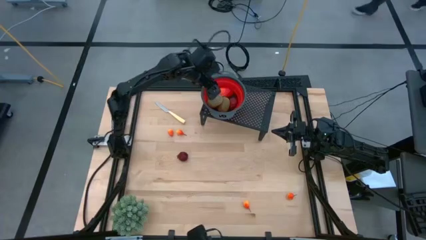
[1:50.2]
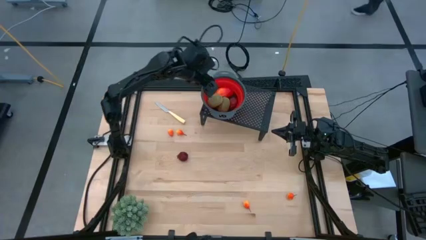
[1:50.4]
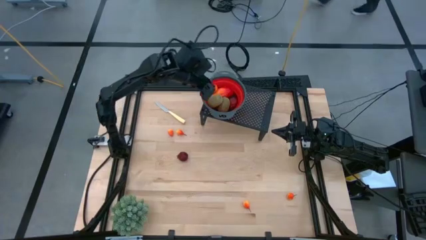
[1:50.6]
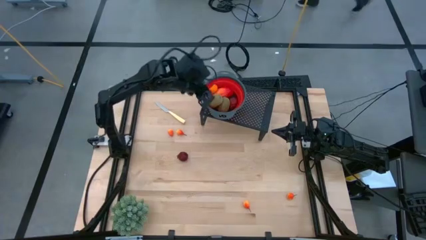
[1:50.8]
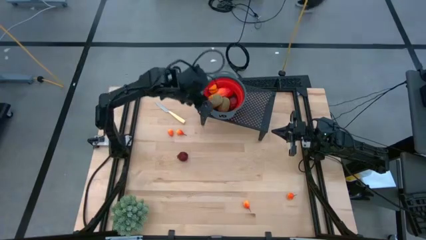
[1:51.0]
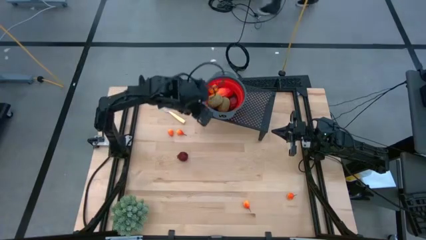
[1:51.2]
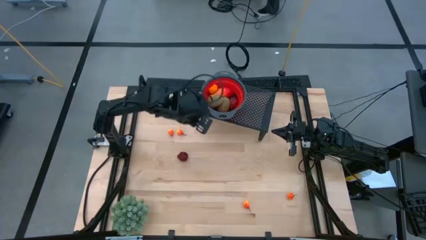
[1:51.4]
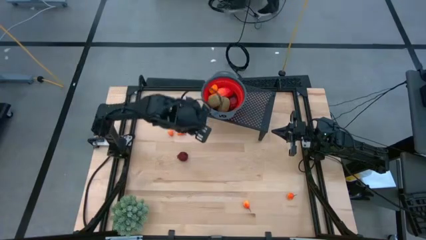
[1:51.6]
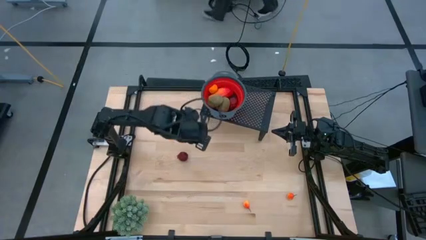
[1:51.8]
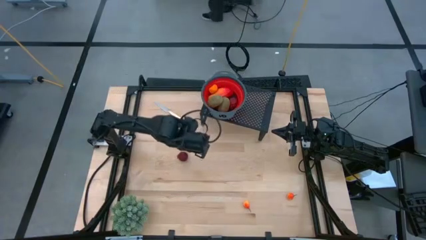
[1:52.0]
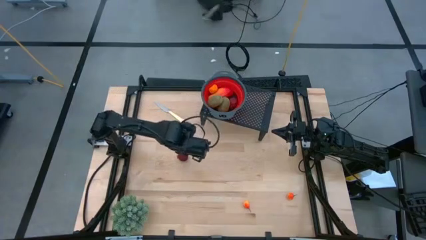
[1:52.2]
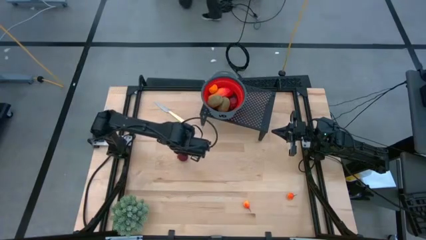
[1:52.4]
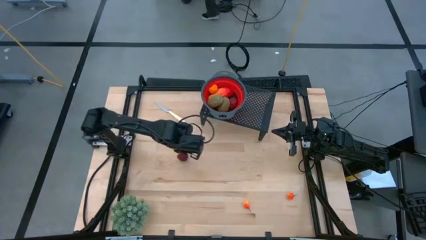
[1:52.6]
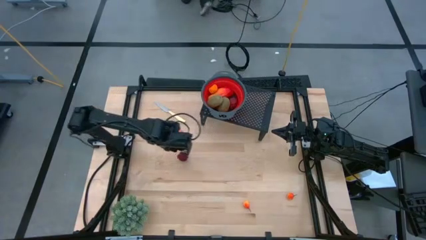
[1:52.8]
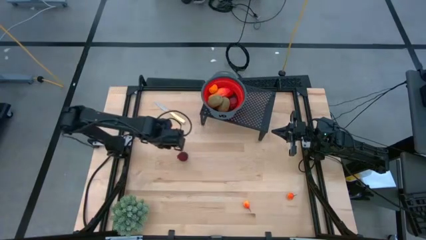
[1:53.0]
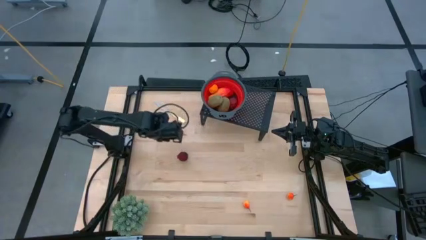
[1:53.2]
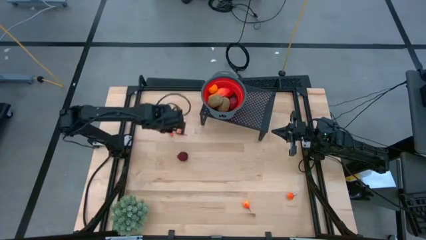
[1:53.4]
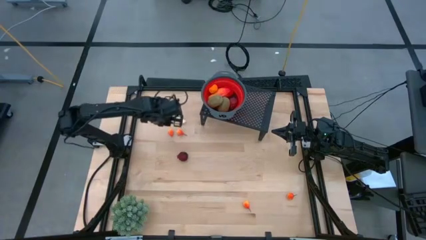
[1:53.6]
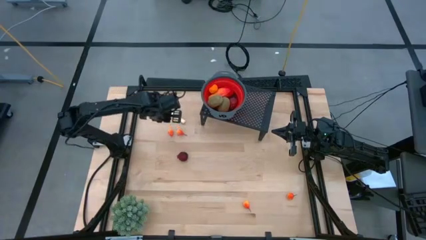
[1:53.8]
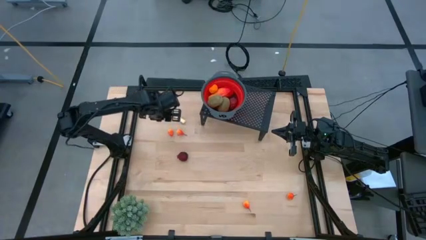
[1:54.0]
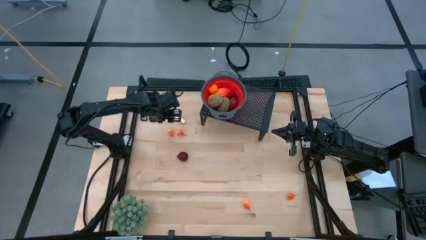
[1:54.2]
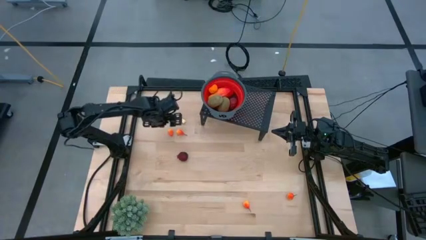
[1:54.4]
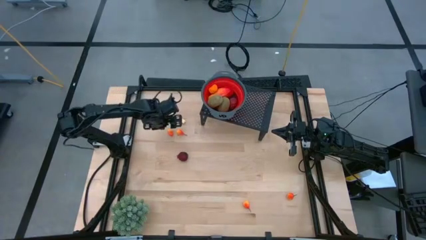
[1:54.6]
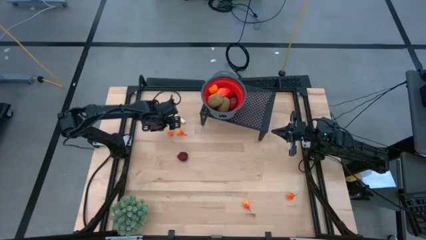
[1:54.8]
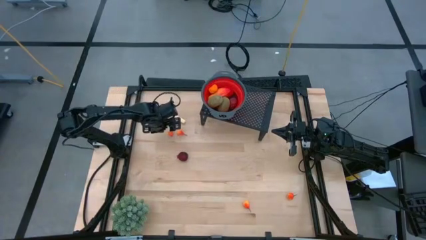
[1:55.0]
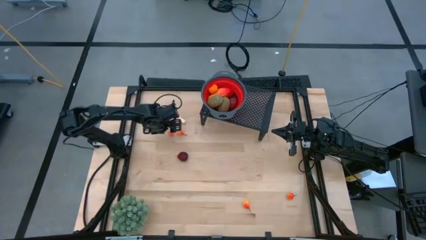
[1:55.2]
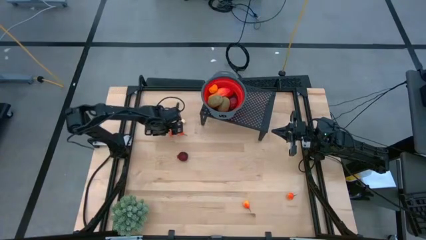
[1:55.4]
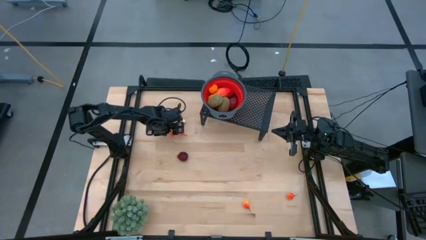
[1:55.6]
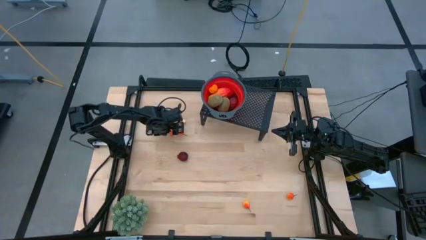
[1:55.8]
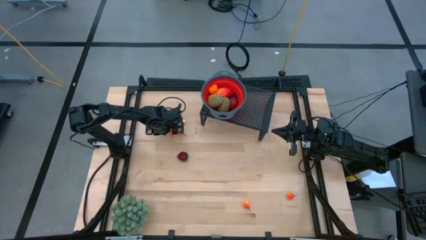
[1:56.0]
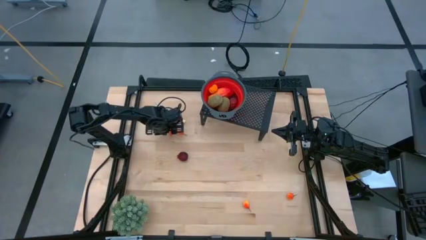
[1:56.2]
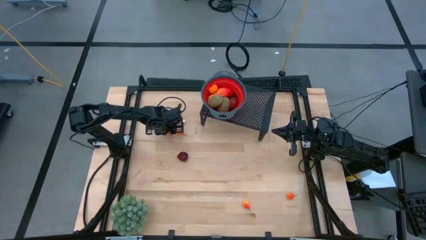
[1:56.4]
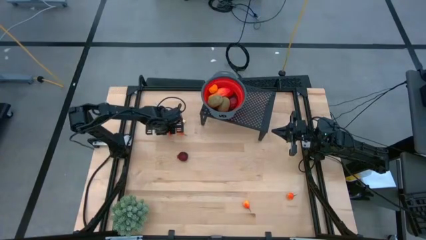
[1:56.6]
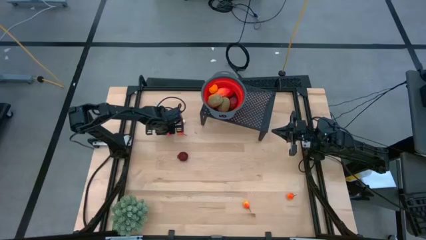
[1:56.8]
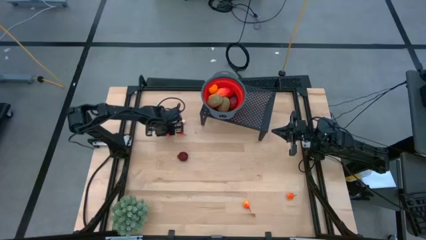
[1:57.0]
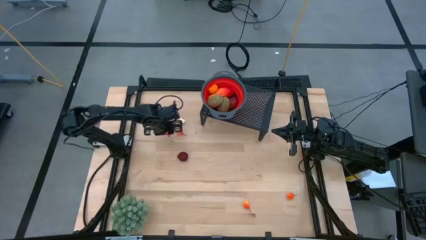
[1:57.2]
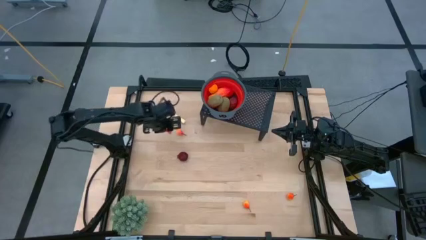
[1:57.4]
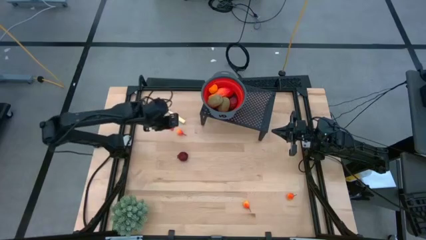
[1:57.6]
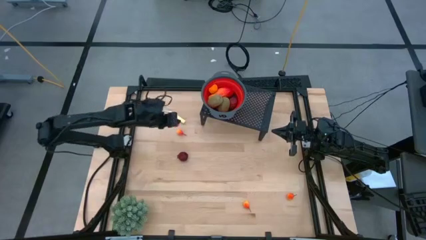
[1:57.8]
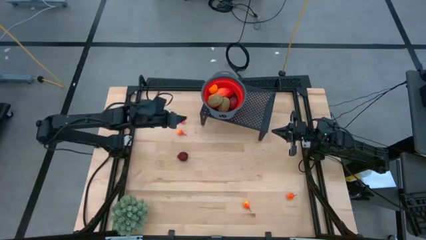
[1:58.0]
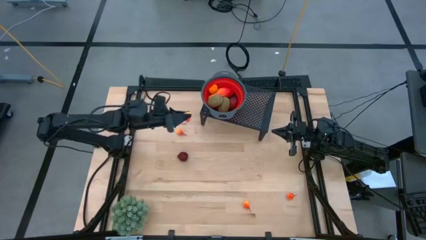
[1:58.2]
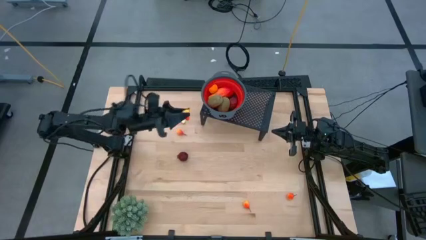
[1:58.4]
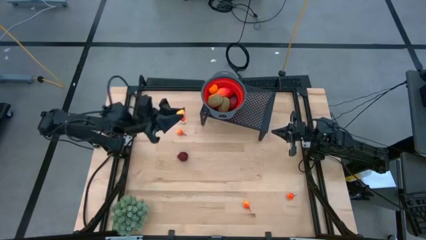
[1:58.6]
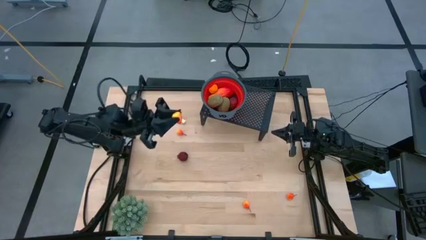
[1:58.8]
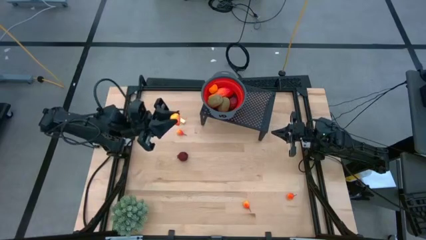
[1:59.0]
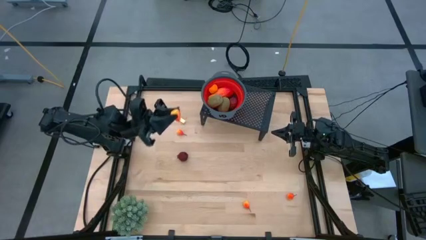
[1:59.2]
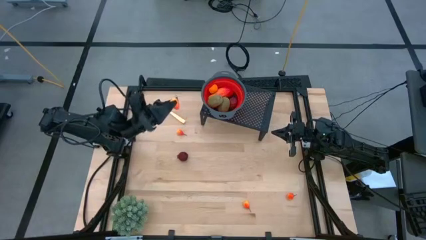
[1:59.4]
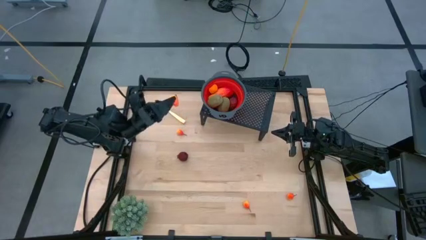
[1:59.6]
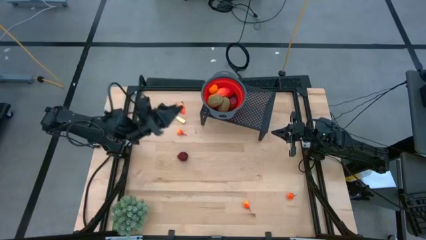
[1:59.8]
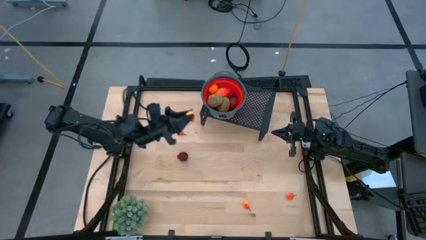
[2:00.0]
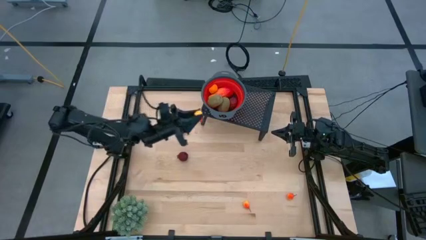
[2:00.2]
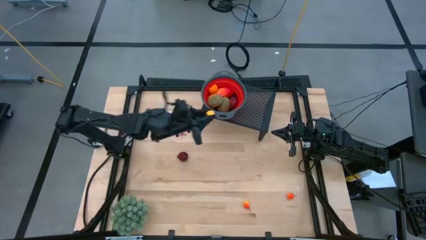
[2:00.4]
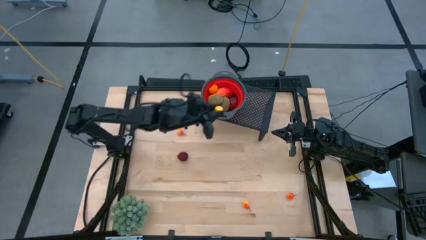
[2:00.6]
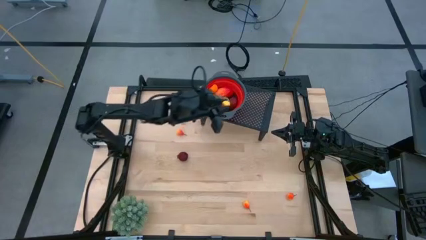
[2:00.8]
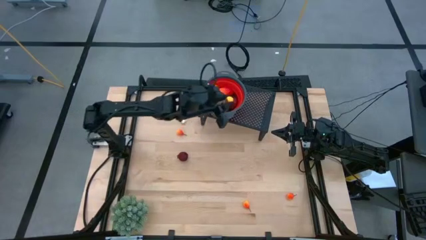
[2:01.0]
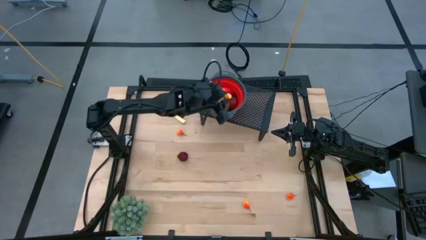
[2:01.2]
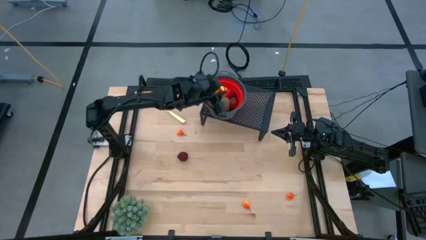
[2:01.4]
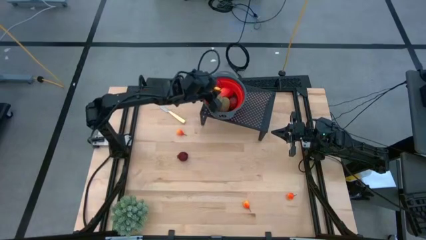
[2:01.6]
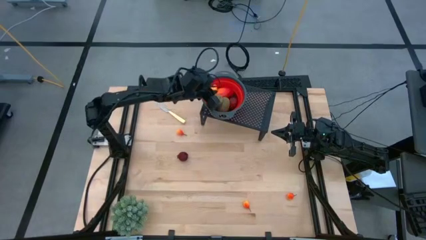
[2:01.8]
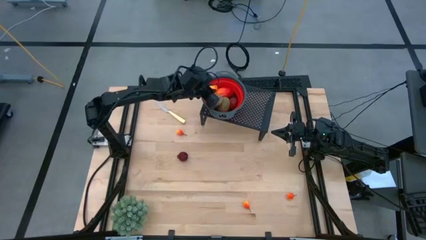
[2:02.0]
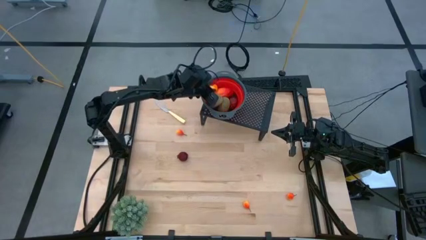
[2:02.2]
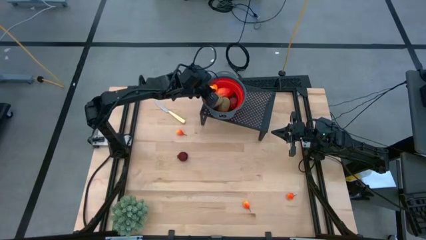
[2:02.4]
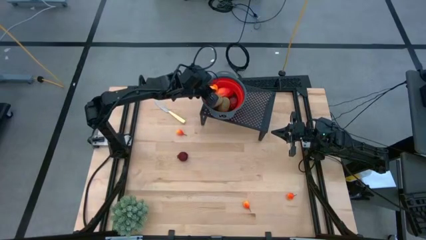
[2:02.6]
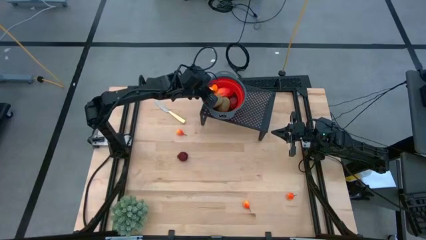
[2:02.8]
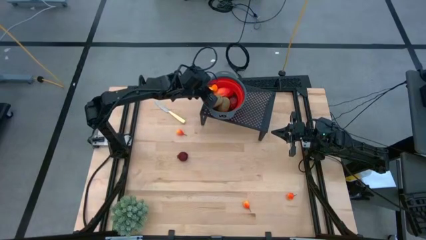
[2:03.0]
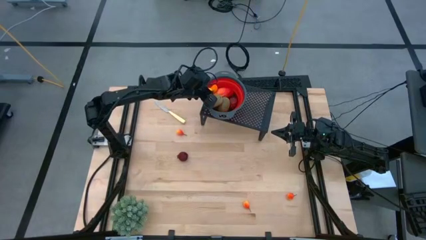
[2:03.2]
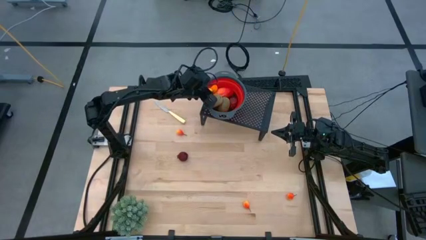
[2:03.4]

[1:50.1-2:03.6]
Task: Pick & Place Fruit
Put the pear into the strainer bowl on the shelf
